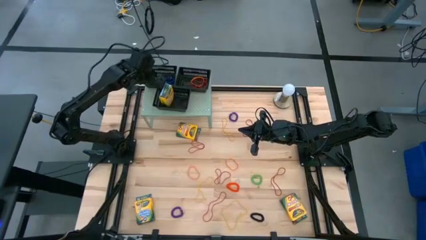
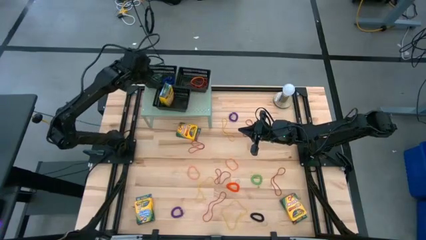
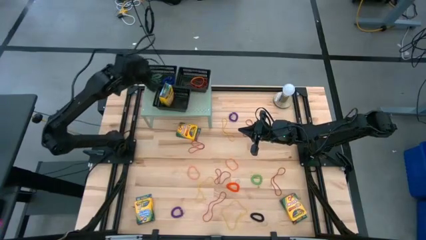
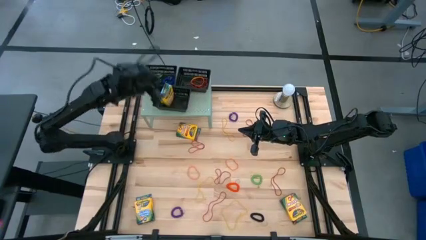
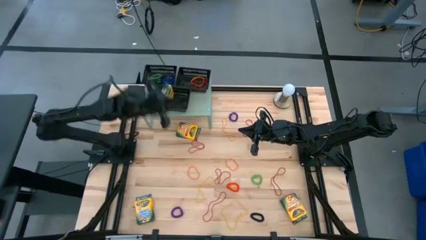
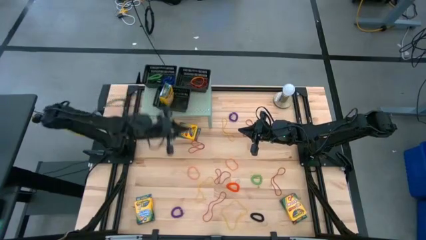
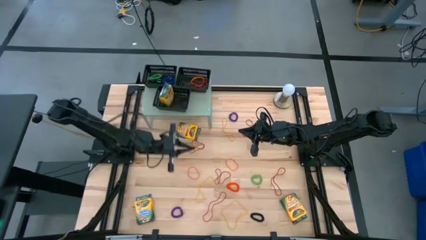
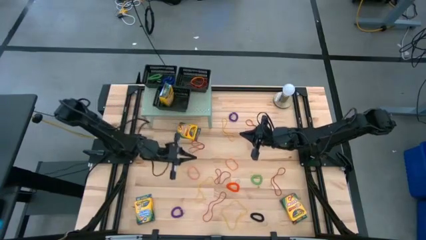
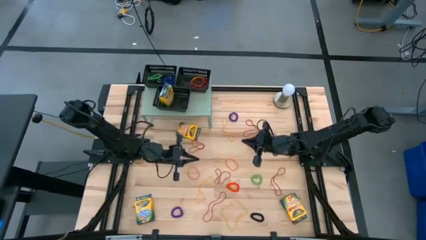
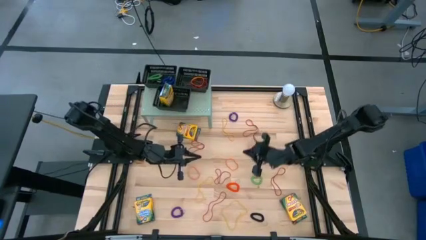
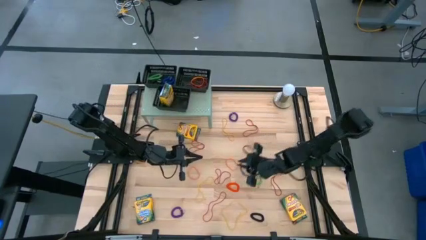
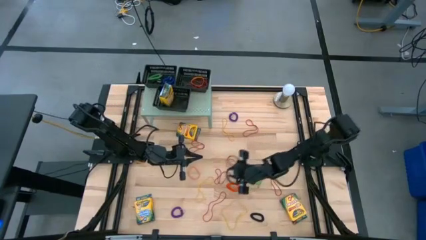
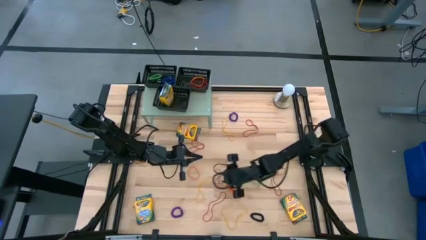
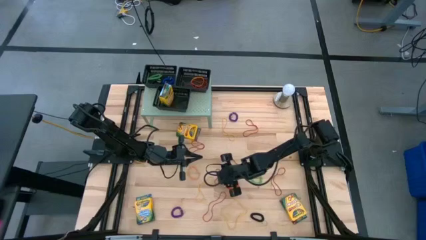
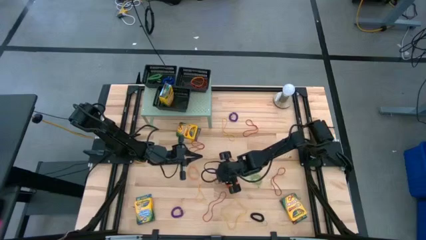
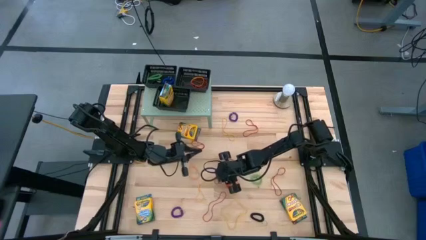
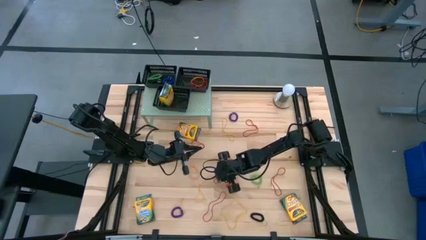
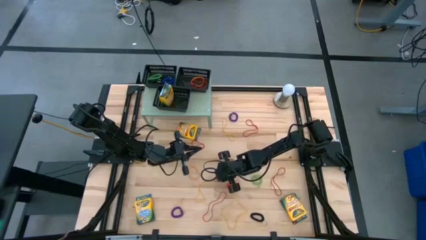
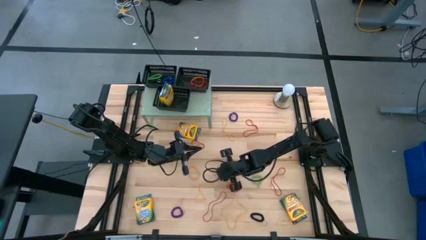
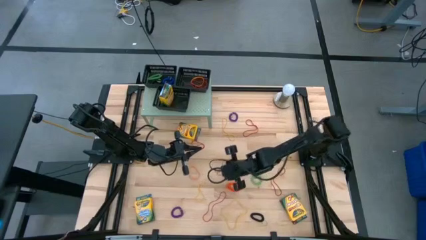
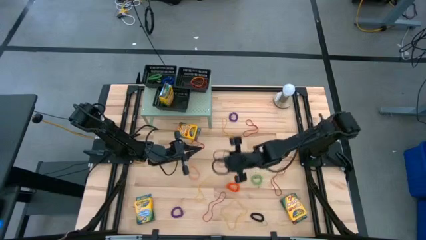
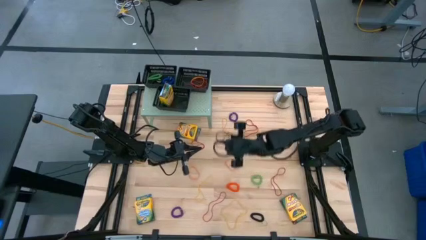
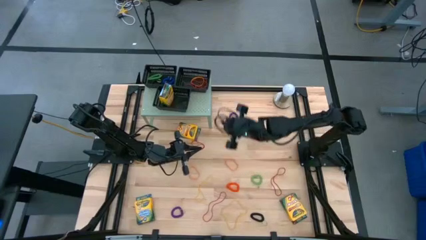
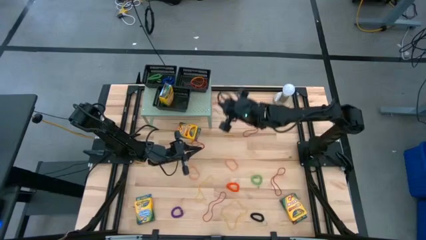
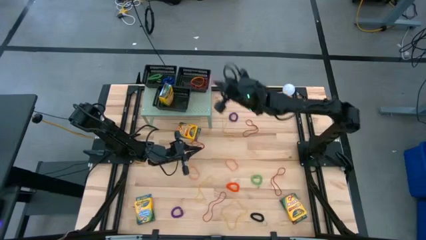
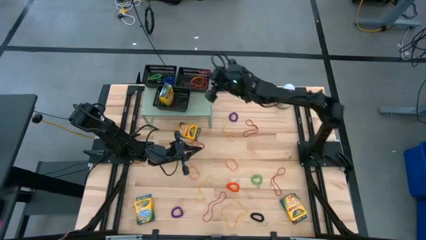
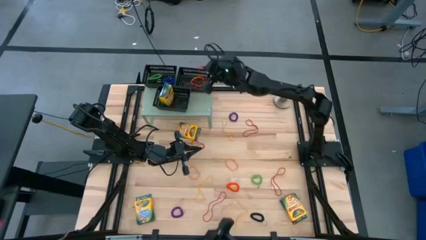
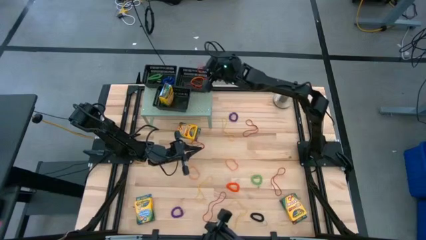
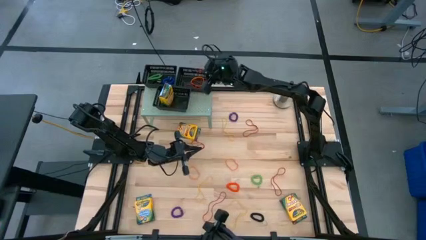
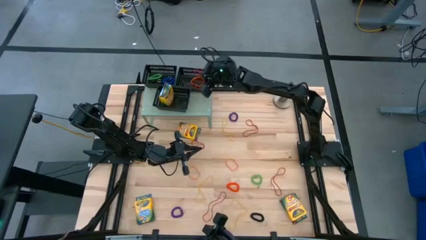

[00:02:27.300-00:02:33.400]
Task: Pick & Place Office Desk Supplies
Put the red rubber band into the top right black bin

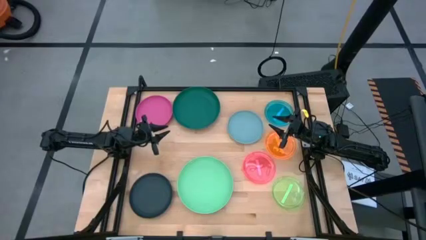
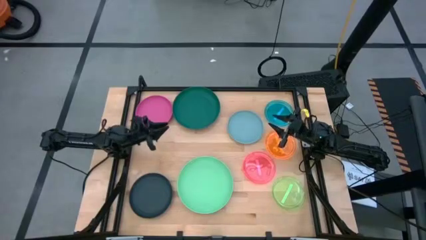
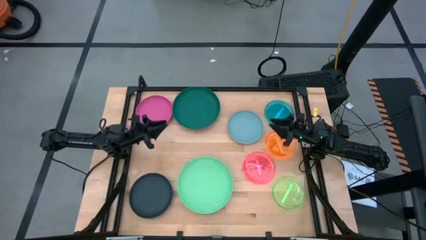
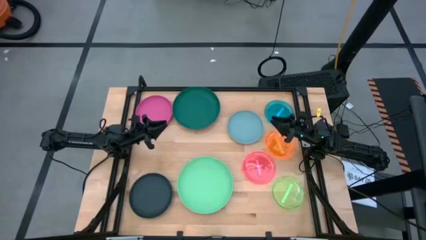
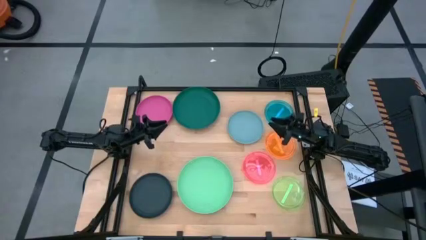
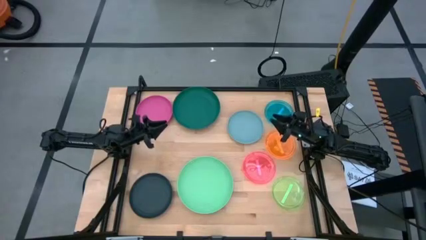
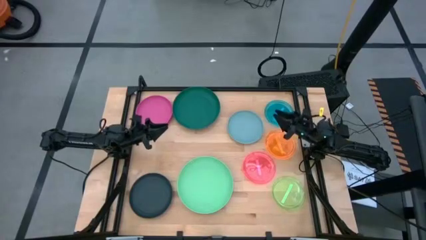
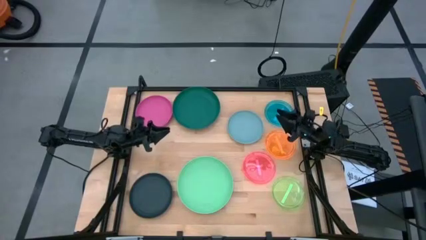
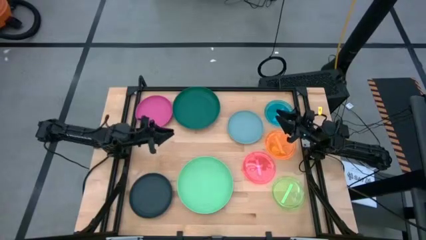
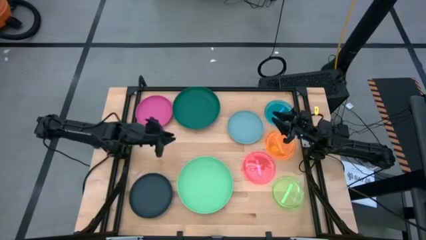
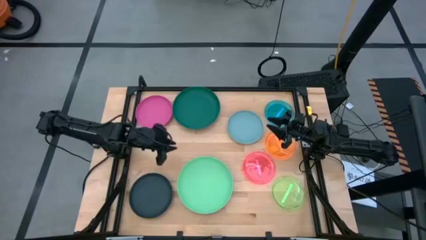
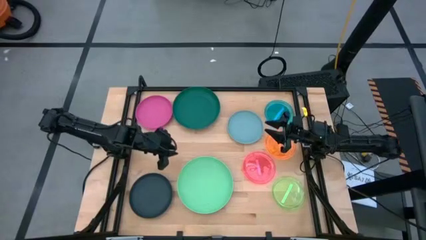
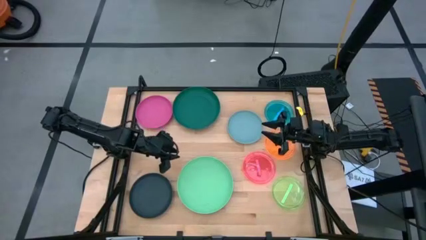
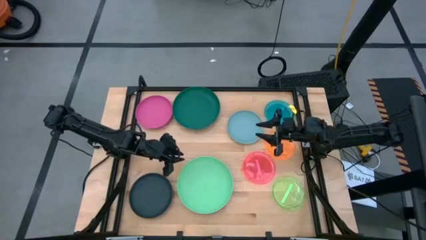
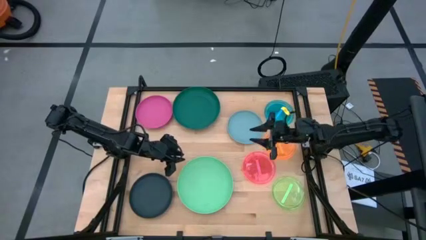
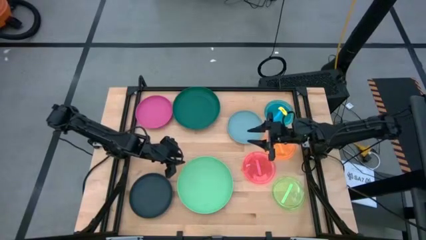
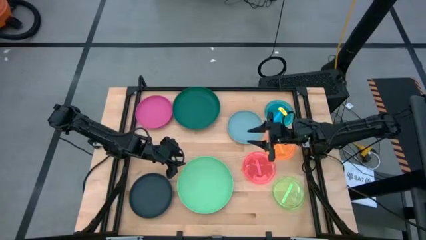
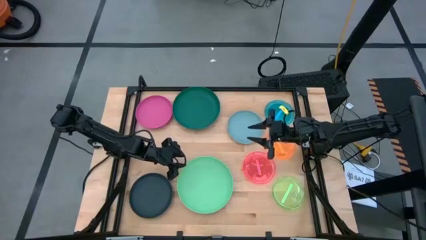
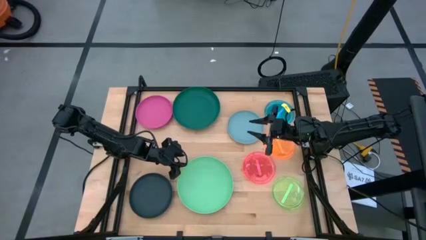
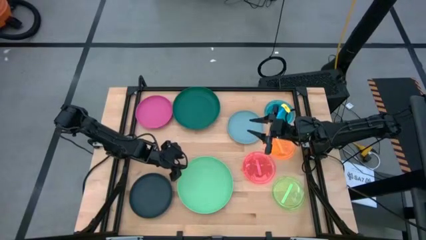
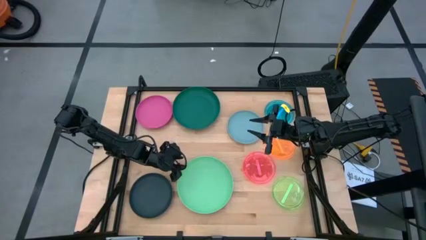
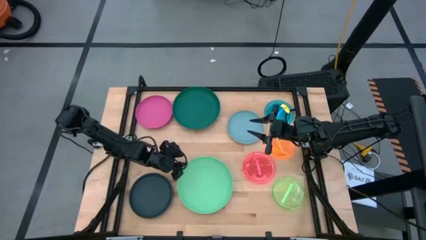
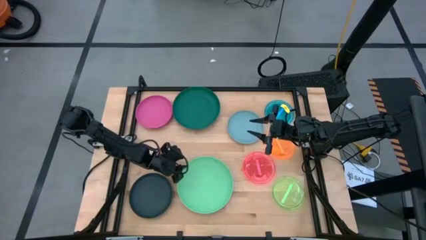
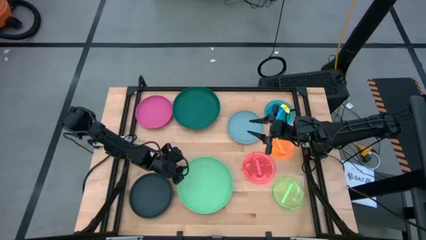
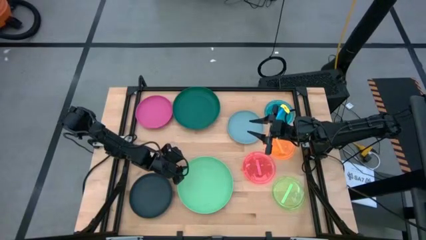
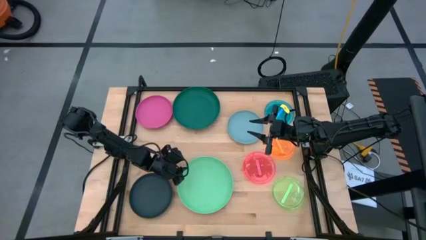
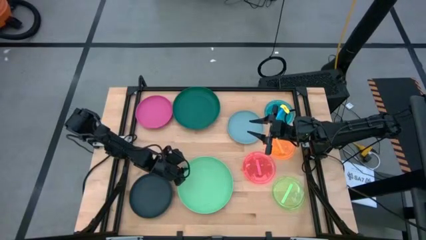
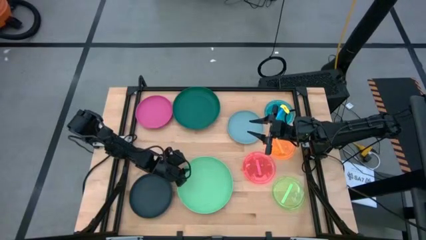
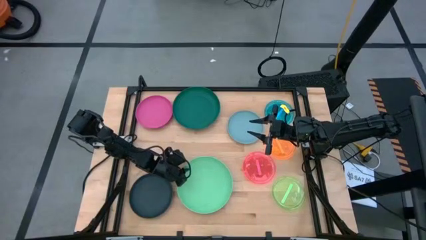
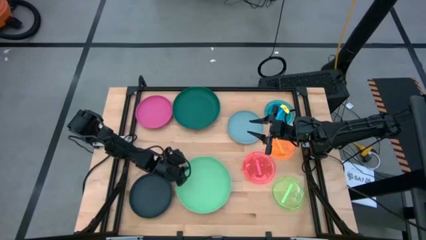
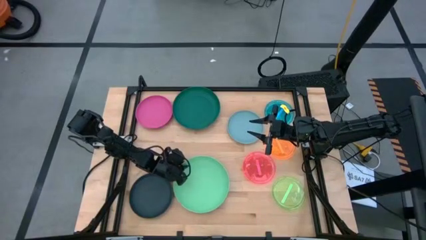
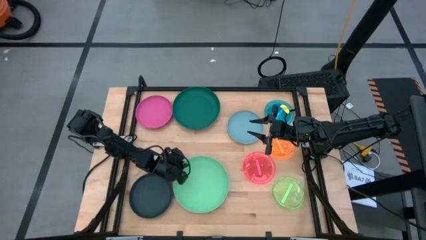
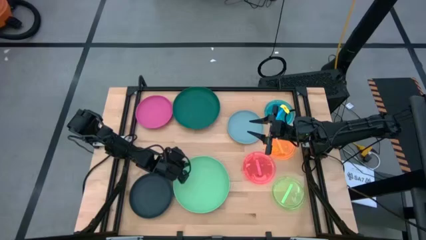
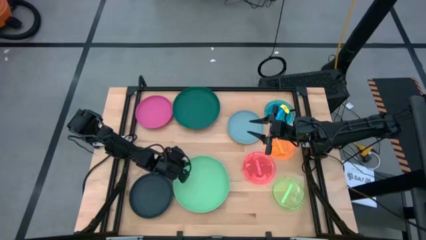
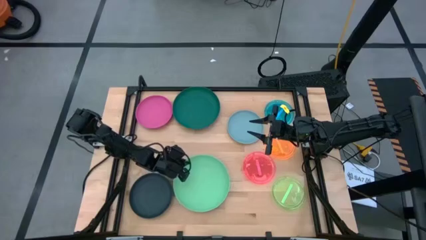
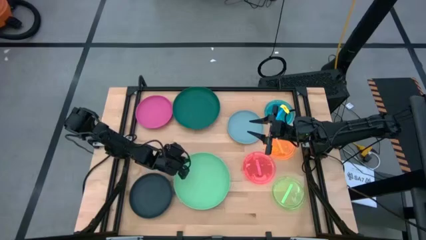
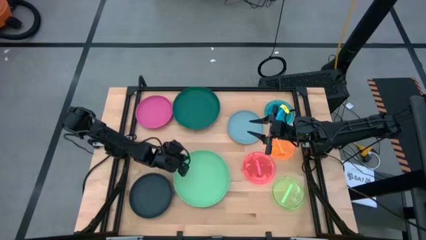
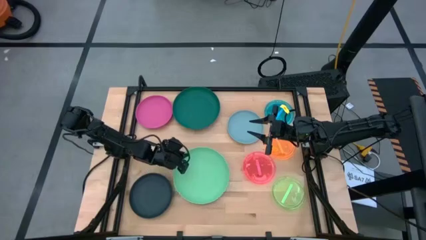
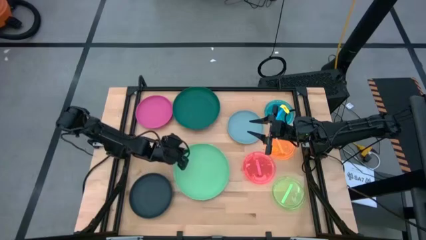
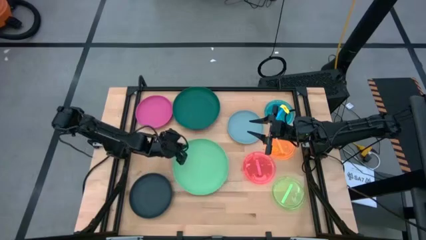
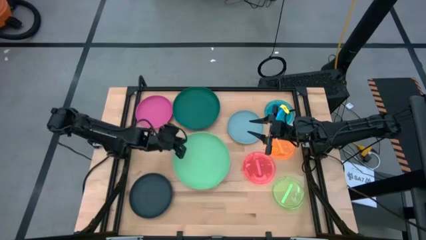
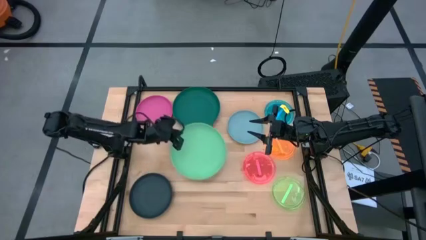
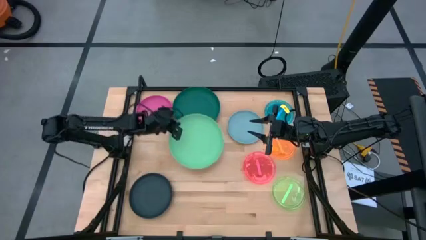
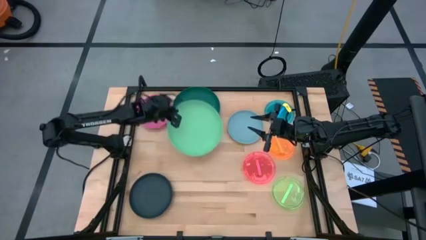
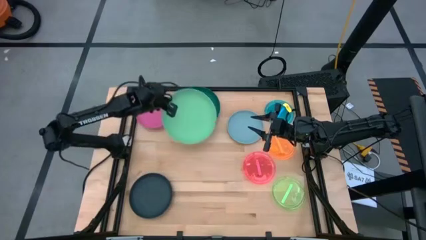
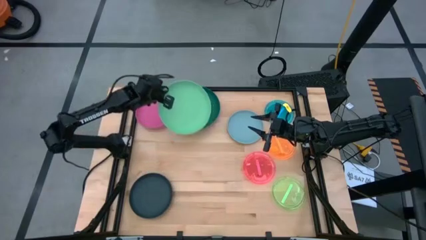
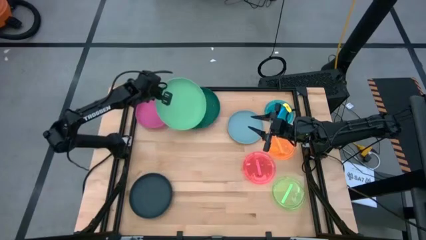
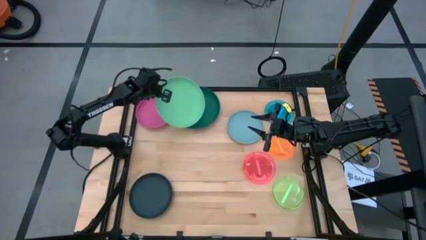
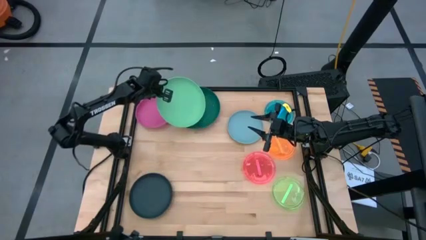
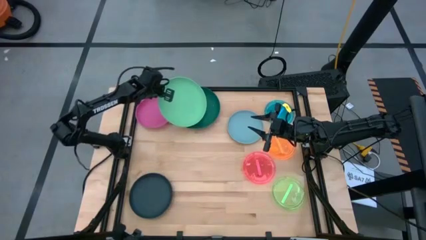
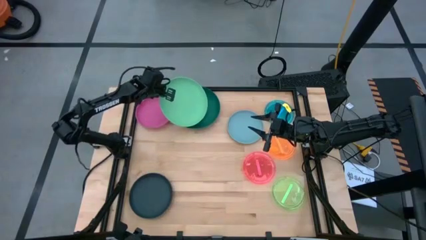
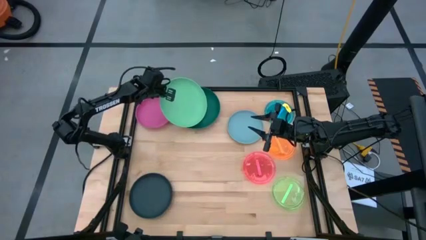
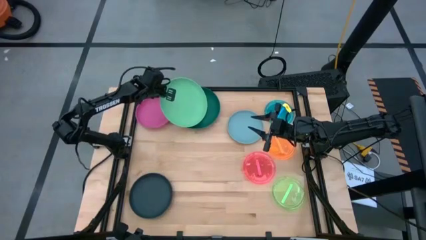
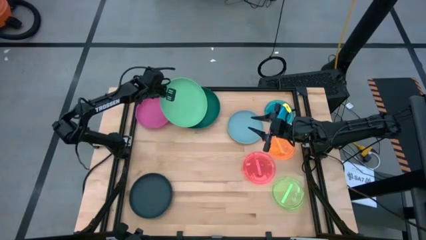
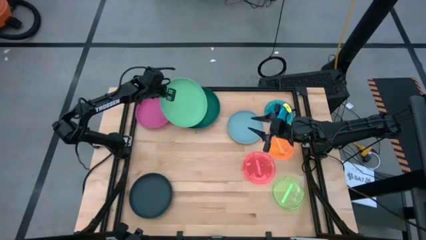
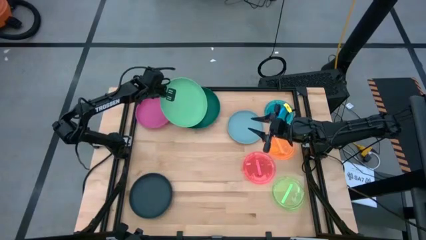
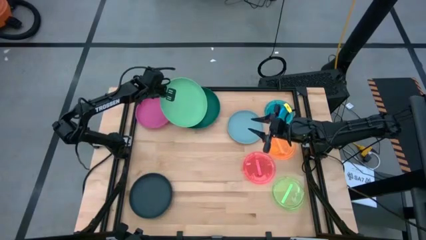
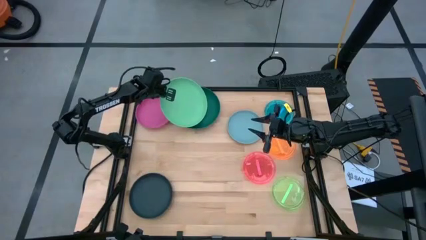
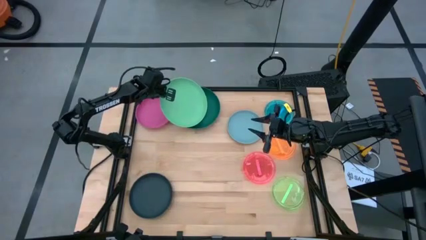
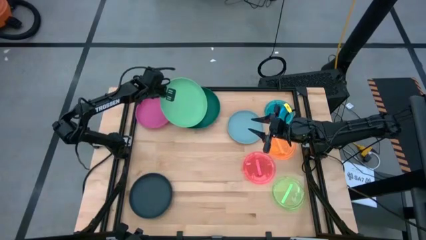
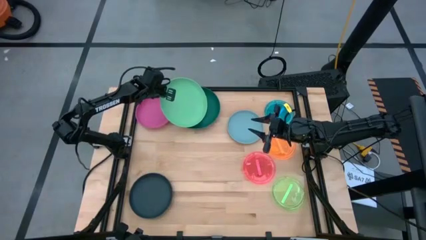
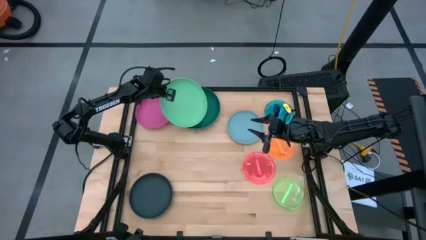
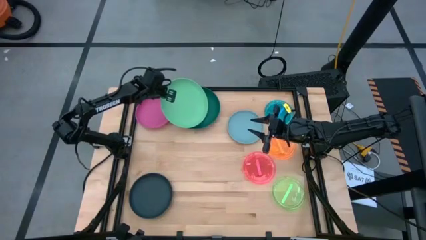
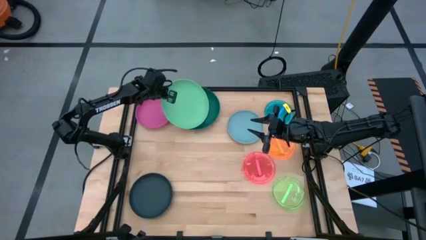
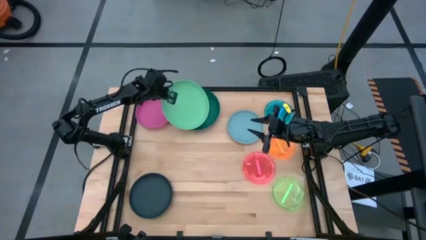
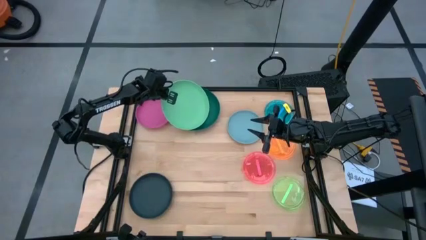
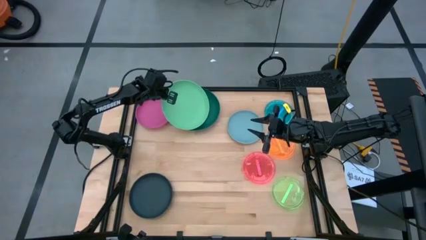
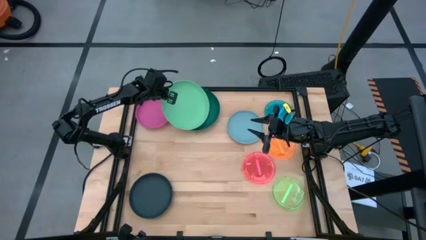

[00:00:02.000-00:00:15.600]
Task: Stack plastic plates
Stack the light green plate on the dark green plate
